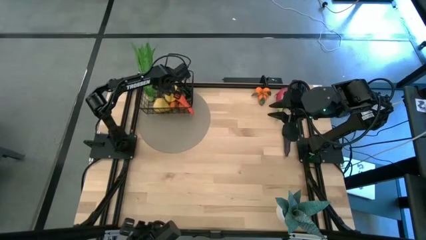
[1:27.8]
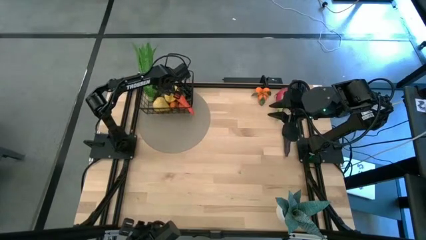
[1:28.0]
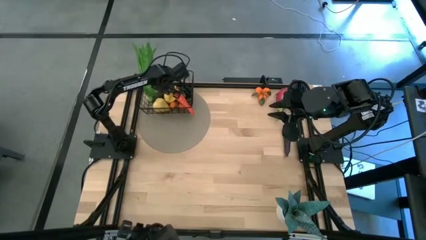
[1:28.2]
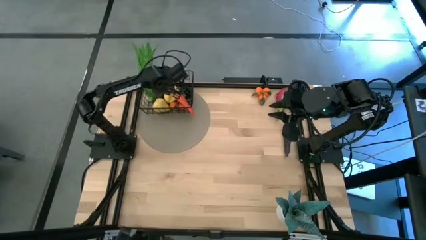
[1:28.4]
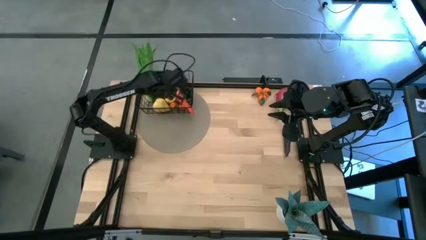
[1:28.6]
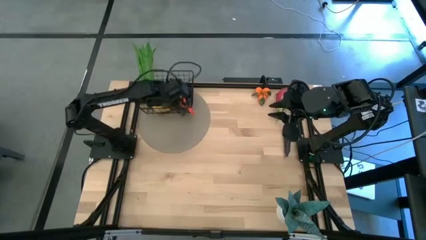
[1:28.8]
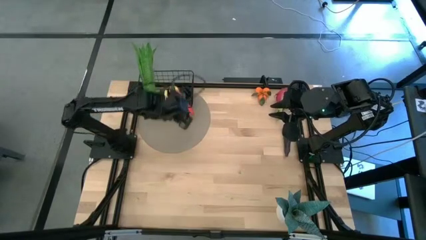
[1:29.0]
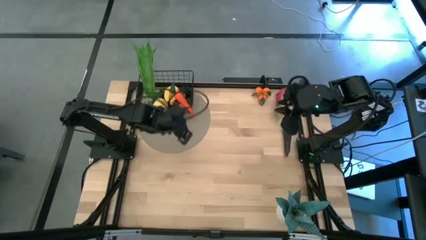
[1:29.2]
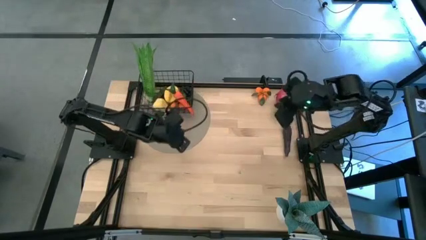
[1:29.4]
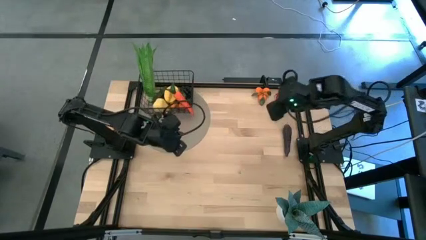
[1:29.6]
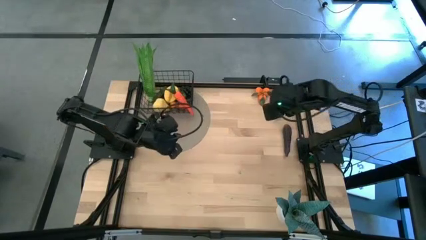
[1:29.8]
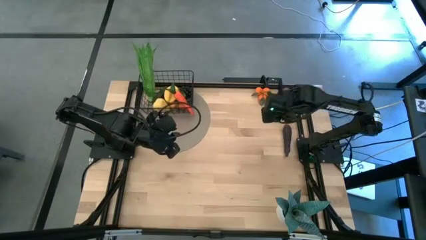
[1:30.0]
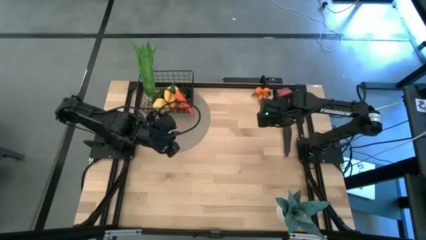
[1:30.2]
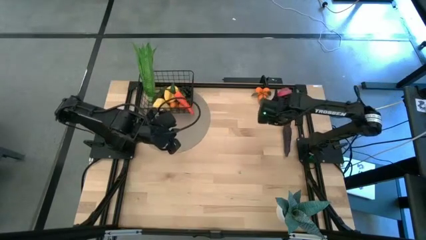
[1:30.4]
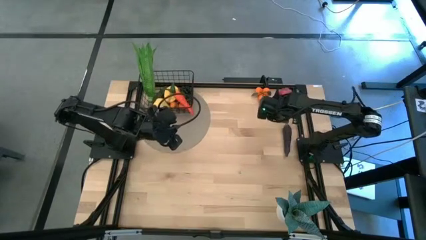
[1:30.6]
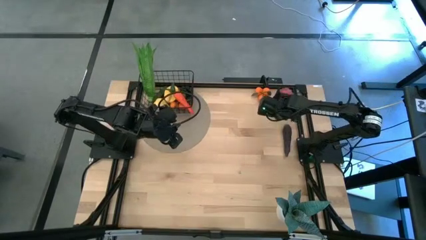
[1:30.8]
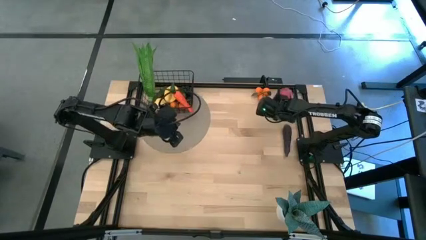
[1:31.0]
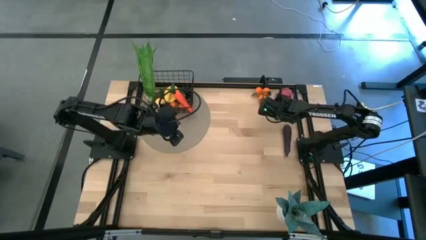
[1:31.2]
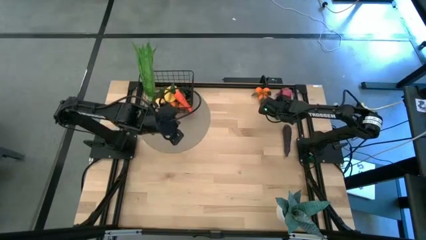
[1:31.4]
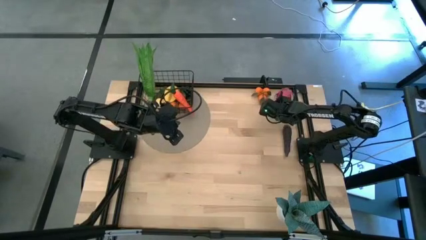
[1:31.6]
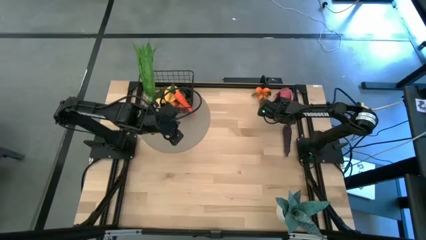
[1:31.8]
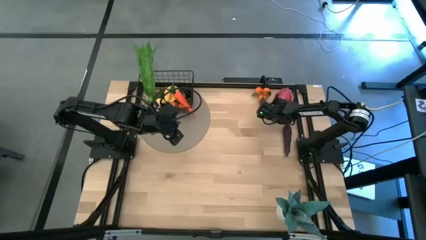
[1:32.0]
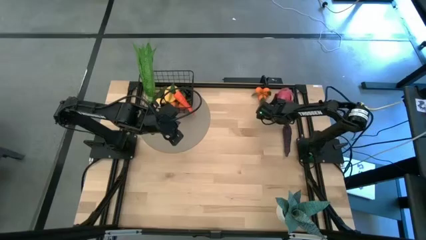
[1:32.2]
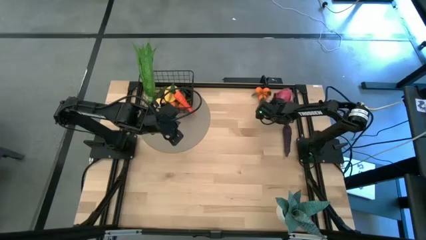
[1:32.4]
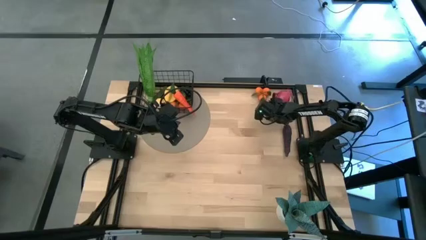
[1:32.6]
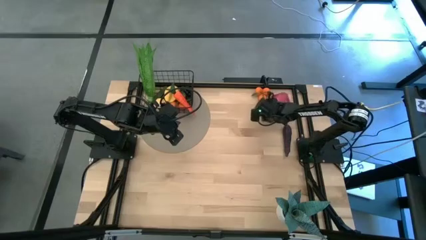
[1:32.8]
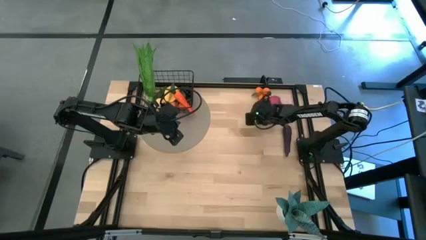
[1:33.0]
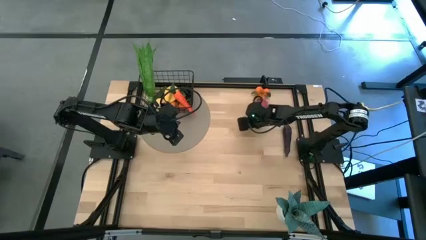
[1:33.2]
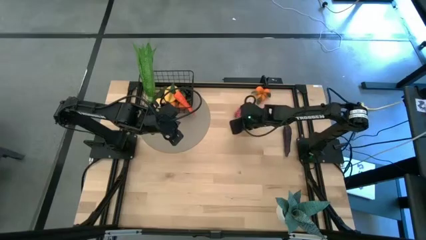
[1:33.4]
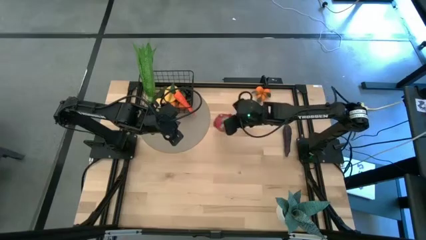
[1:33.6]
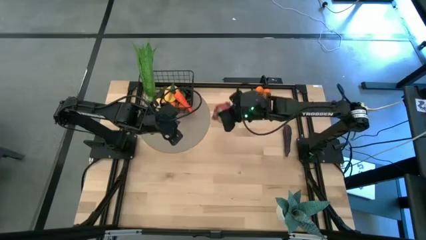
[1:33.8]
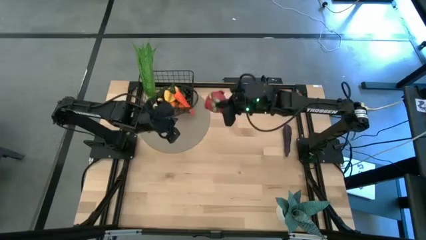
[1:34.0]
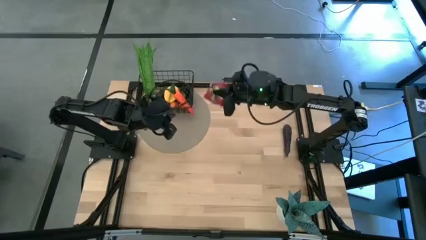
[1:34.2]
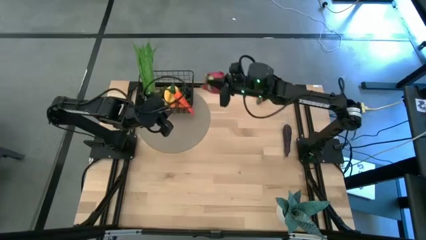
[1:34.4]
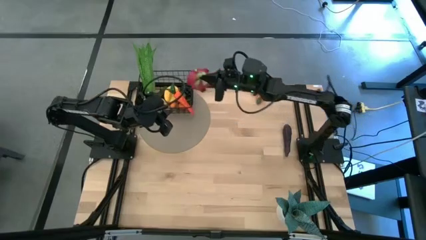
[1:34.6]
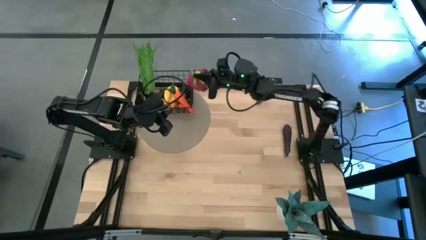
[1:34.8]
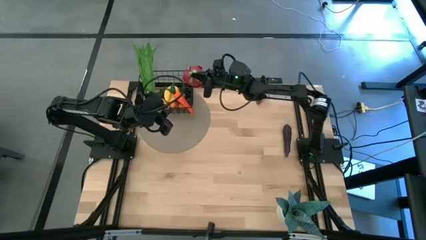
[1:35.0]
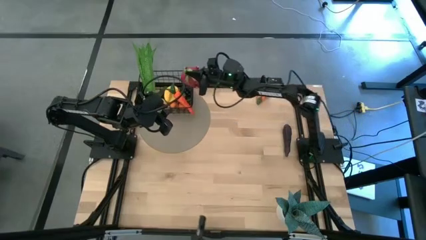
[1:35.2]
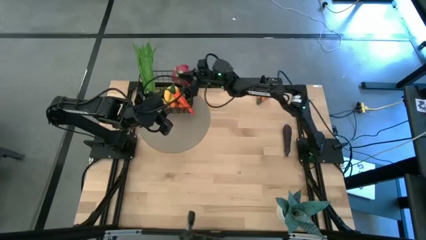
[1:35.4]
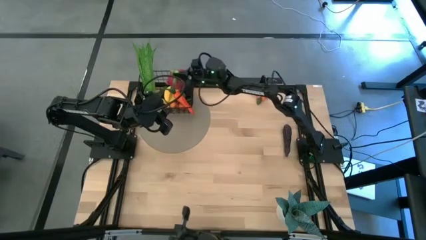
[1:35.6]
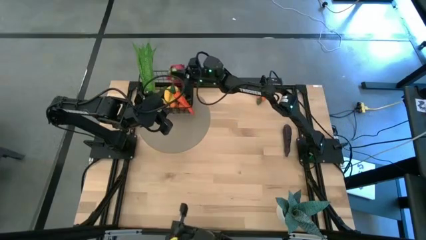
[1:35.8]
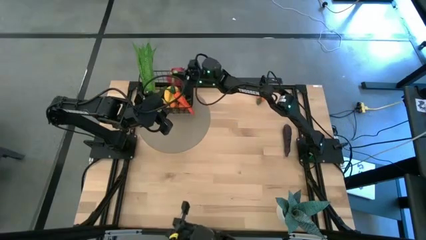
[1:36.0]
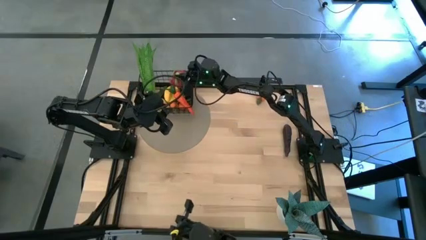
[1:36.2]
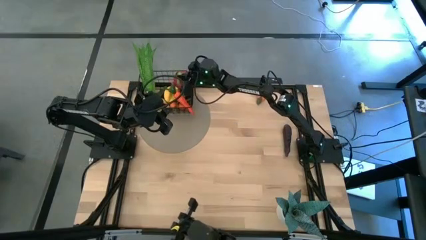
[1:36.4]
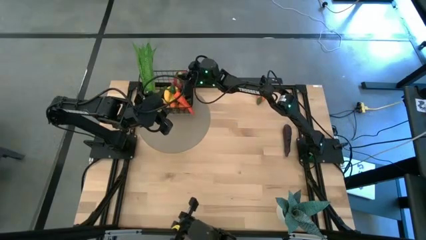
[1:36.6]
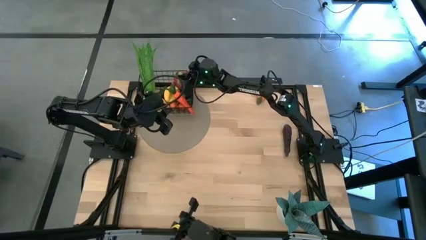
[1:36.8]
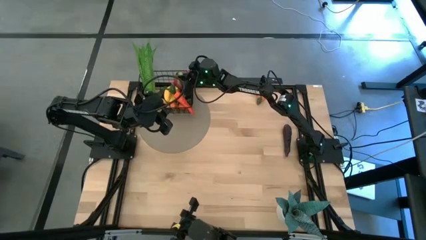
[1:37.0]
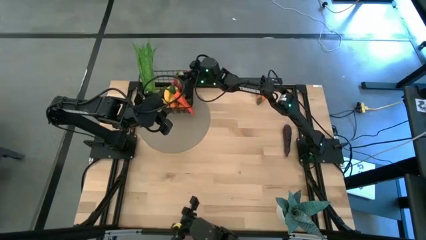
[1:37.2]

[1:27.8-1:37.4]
Task: Build produce basket
Put the pink dragon fruit into the wire basket

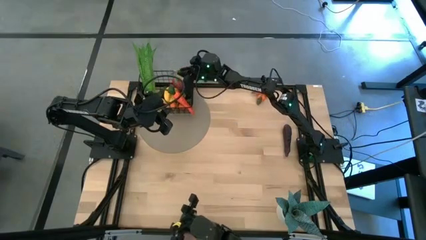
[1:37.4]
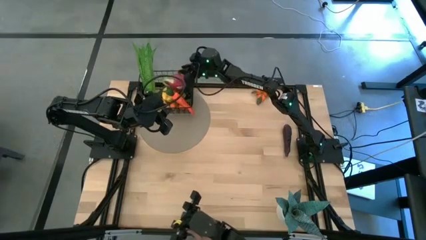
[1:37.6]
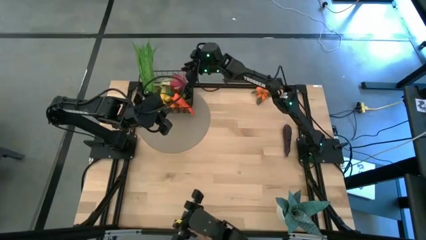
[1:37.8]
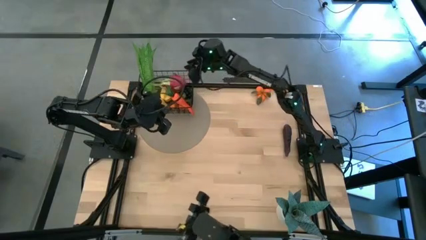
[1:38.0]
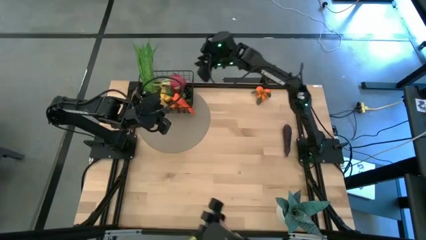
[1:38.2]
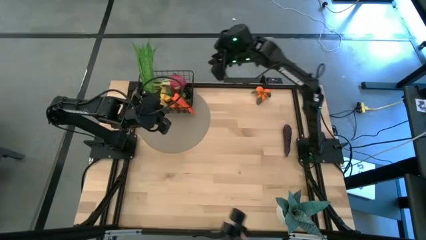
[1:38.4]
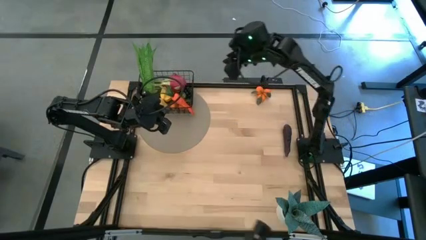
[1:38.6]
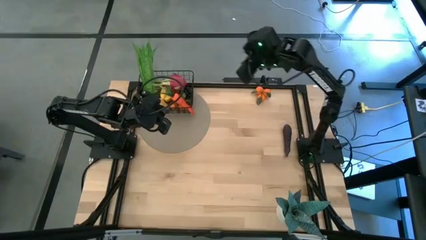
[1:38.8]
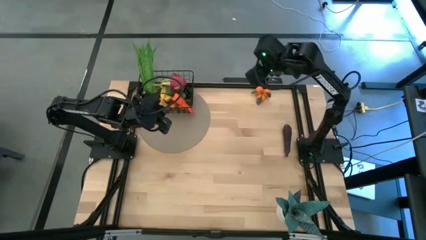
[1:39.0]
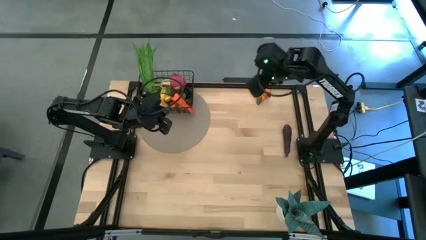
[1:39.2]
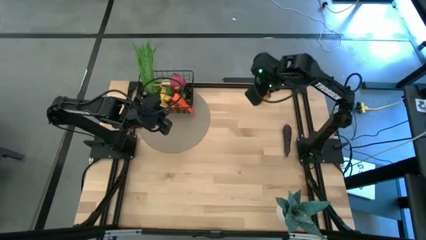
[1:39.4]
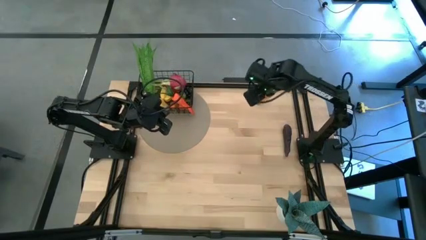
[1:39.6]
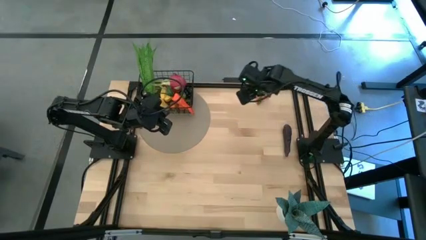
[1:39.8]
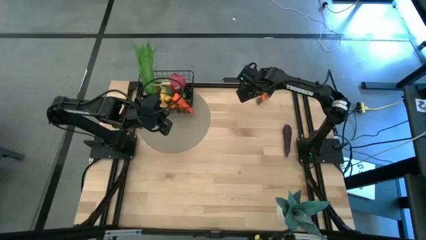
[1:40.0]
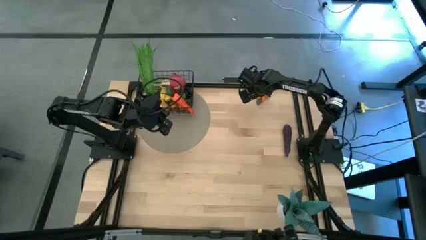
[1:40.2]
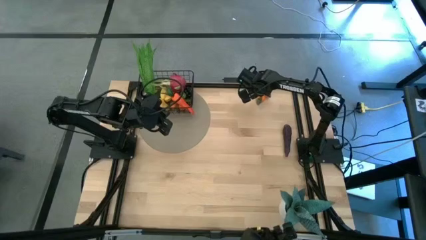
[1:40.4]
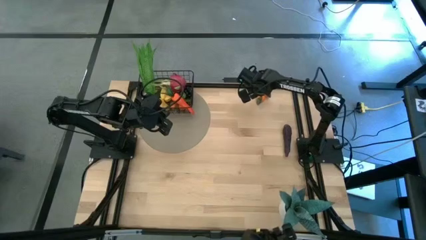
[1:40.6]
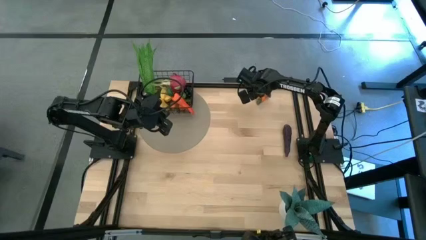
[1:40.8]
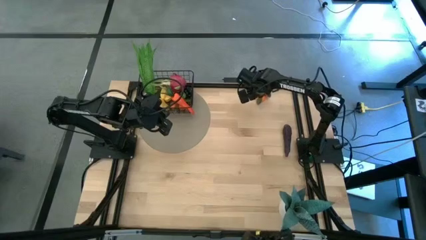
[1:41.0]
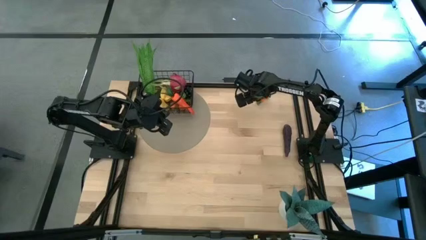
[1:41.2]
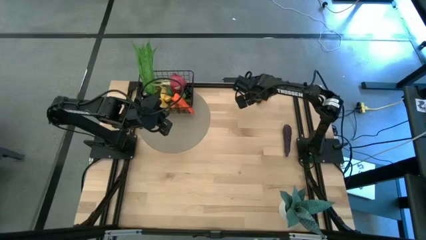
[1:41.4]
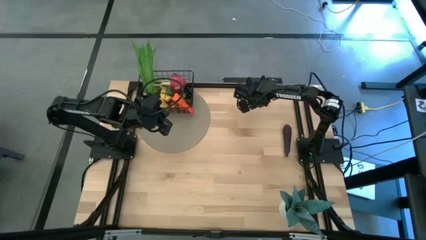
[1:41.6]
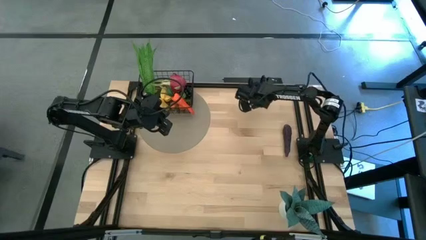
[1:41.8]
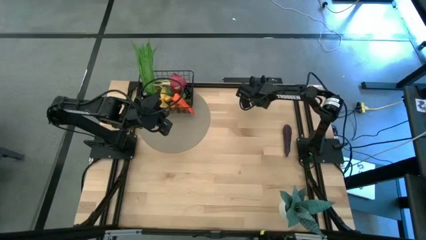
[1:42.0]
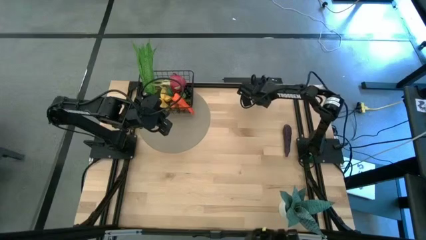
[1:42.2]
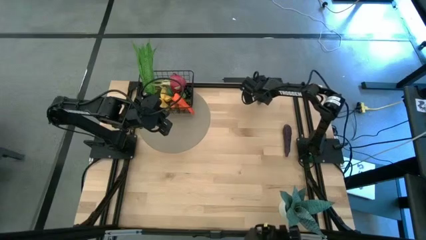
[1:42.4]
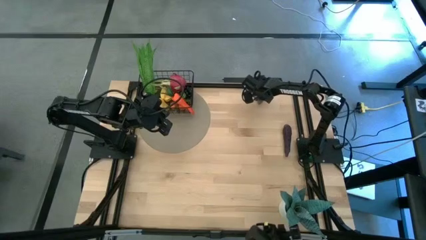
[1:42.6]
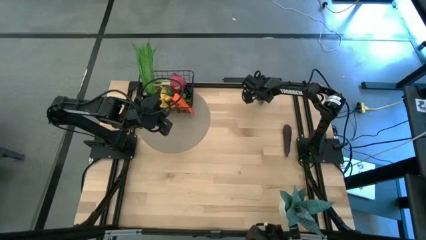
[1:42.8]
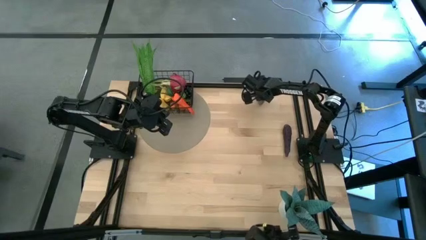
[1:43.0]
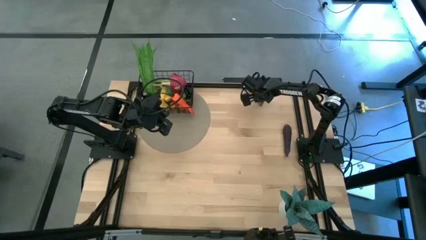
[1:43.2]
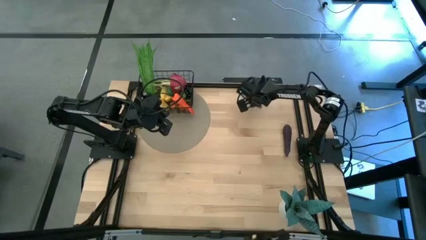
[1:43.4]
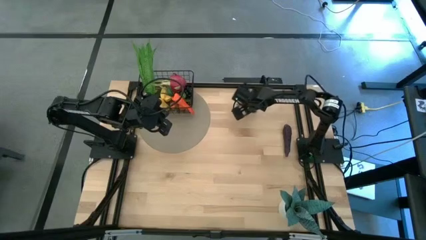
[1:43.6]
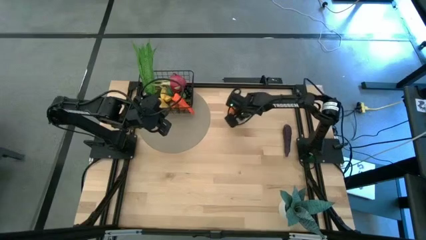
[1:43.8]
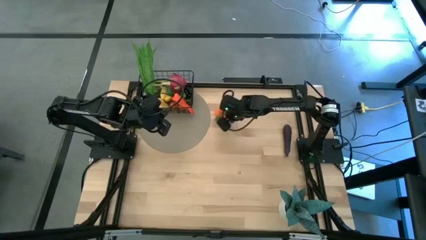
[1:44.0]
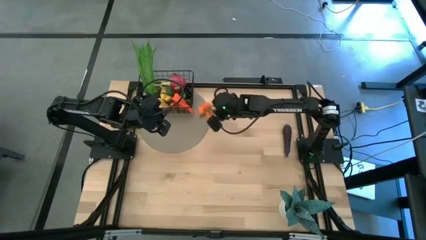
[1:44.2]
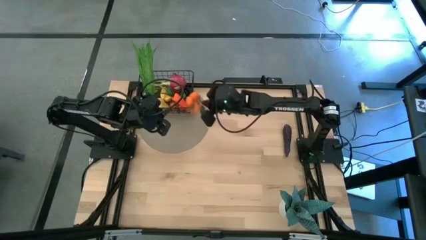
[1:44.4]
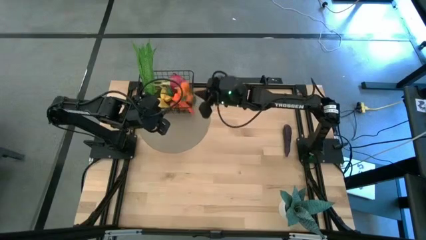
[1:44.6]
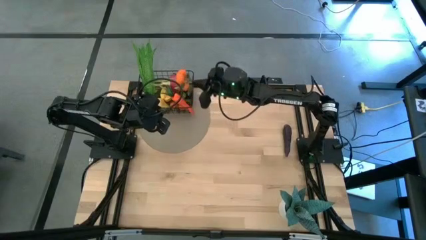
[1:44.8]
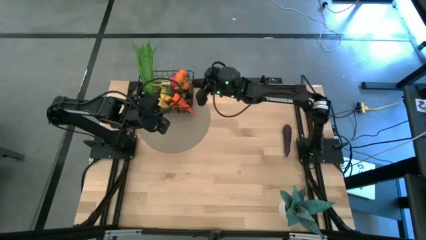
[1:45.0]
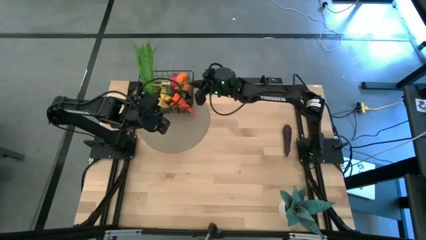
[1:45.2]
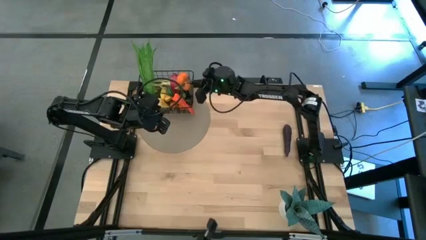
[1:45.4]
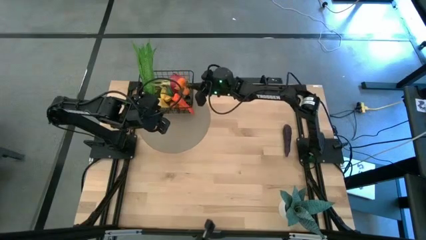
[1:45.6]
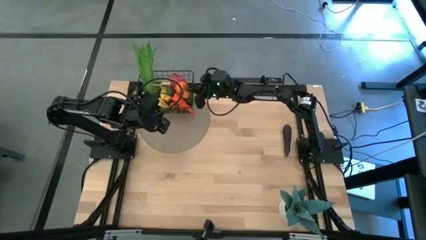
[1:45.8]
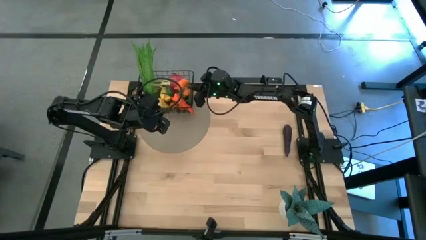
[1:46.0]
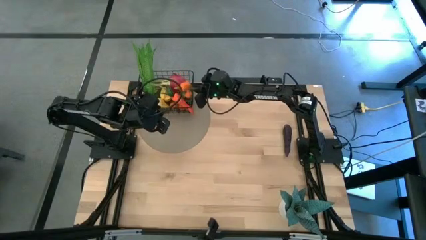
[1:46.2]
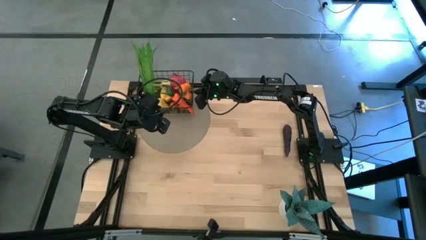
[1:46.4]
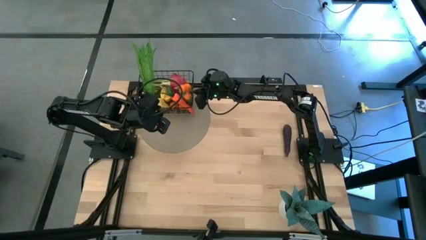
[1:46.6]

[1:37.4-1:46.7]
Put the orange tangerine into the wire basket
